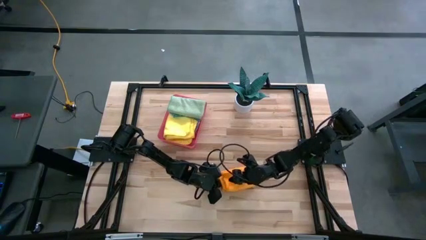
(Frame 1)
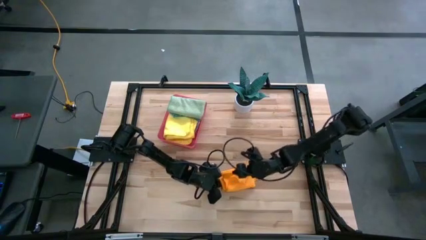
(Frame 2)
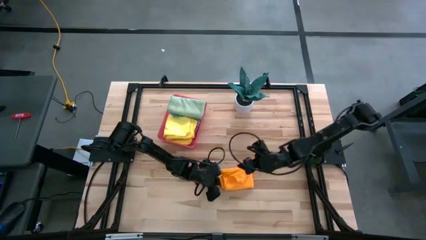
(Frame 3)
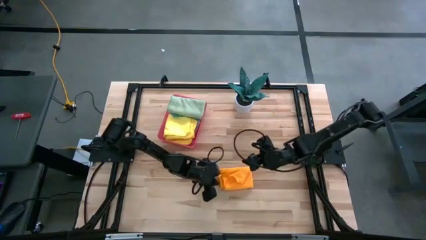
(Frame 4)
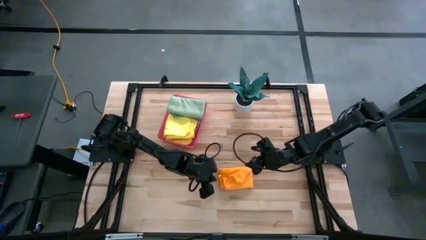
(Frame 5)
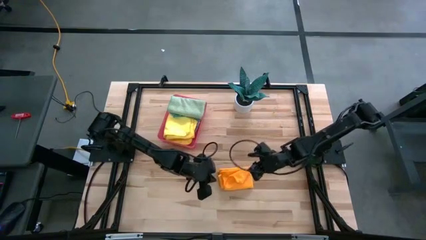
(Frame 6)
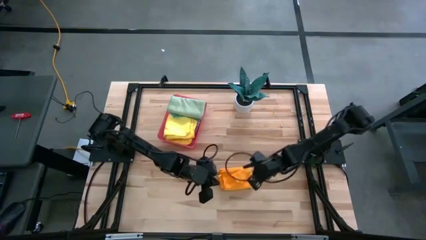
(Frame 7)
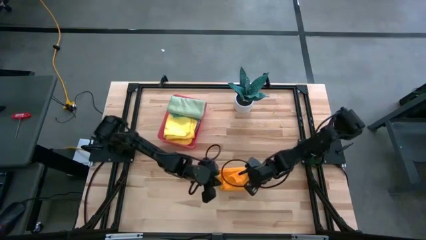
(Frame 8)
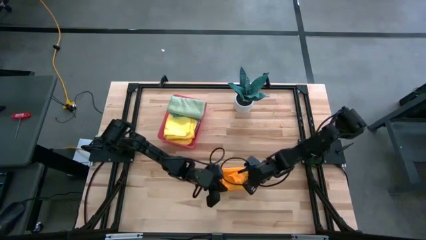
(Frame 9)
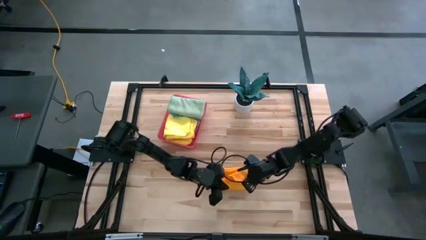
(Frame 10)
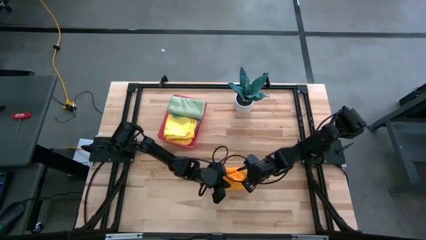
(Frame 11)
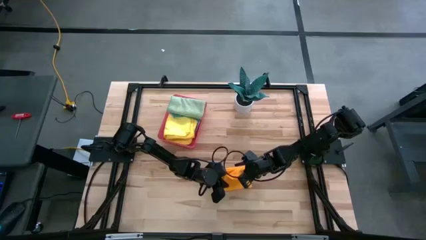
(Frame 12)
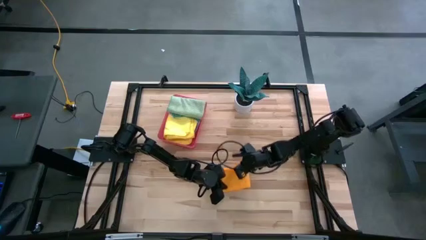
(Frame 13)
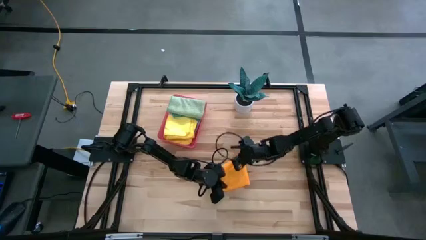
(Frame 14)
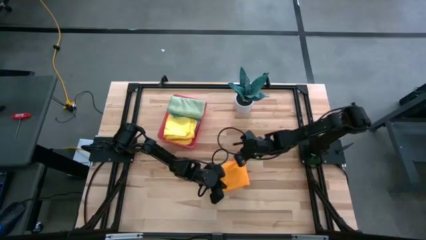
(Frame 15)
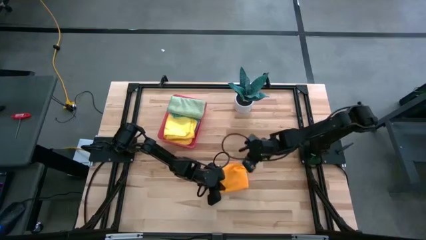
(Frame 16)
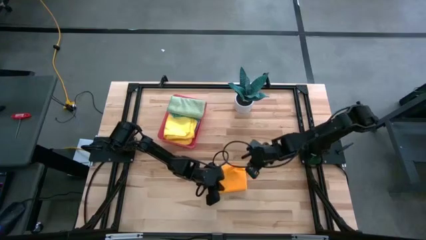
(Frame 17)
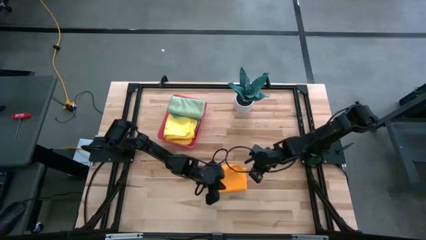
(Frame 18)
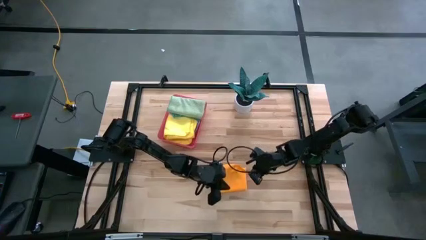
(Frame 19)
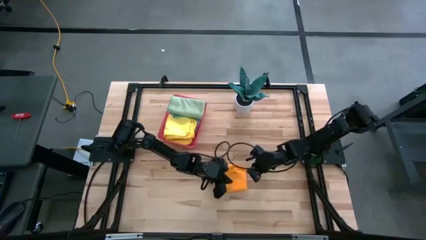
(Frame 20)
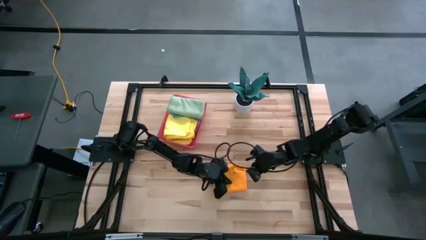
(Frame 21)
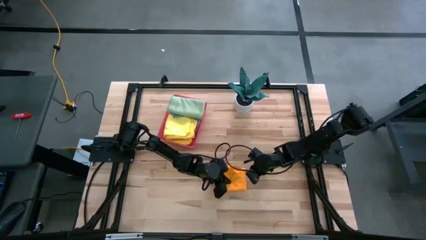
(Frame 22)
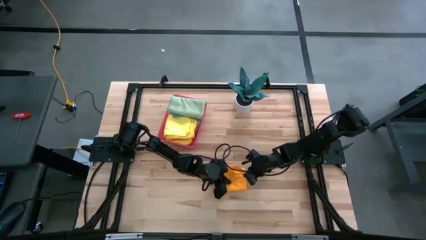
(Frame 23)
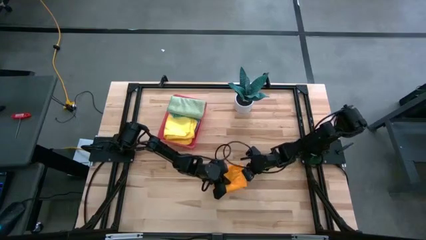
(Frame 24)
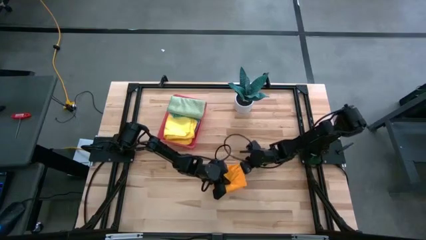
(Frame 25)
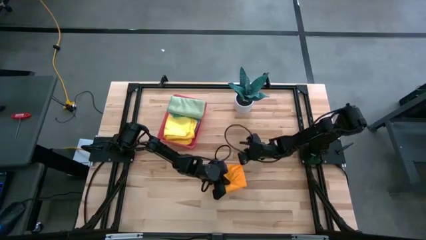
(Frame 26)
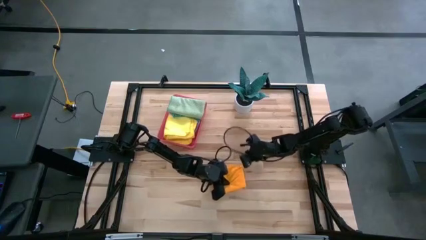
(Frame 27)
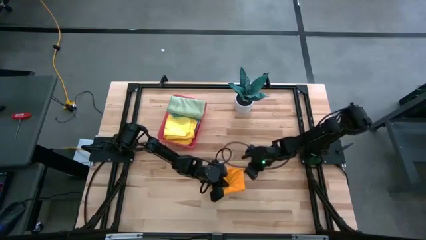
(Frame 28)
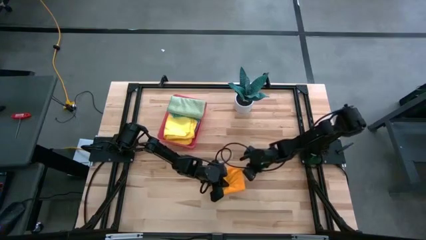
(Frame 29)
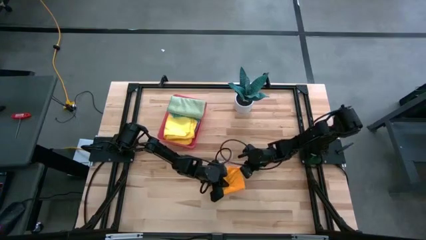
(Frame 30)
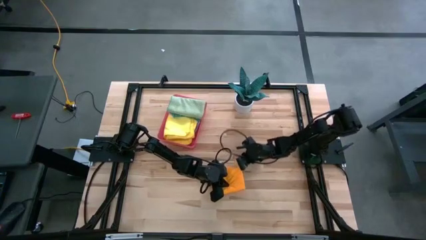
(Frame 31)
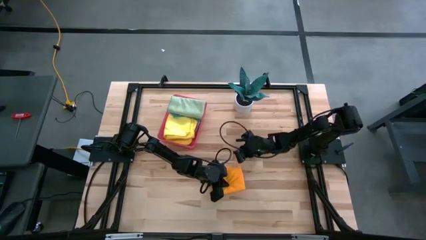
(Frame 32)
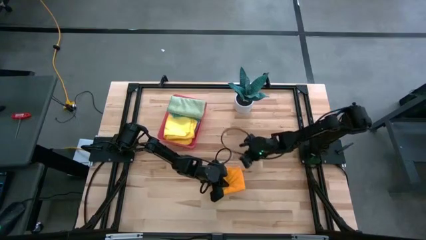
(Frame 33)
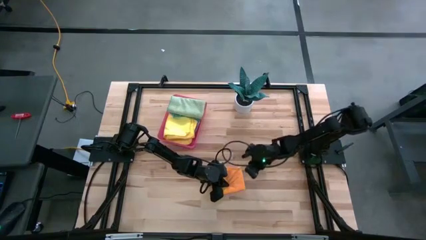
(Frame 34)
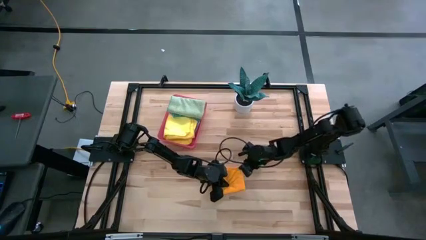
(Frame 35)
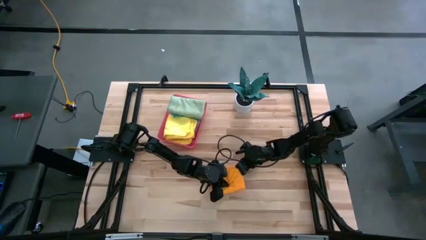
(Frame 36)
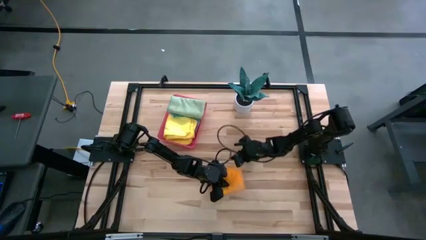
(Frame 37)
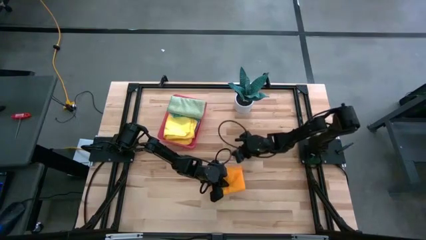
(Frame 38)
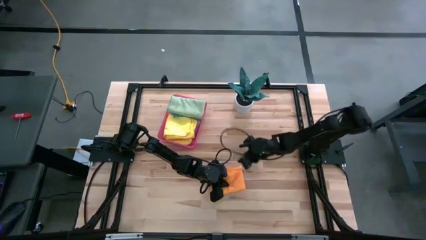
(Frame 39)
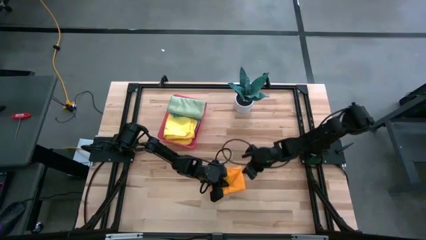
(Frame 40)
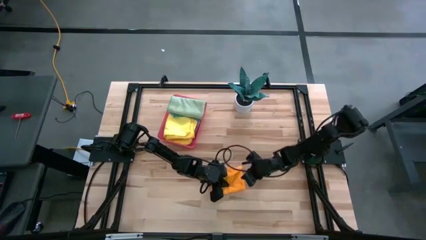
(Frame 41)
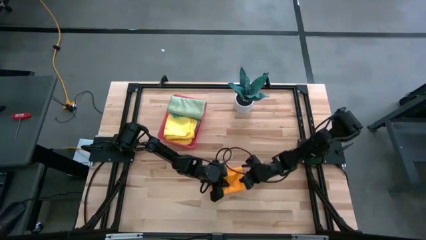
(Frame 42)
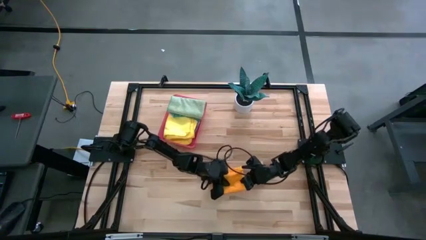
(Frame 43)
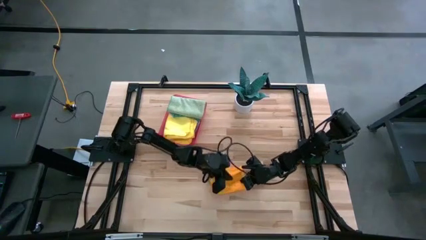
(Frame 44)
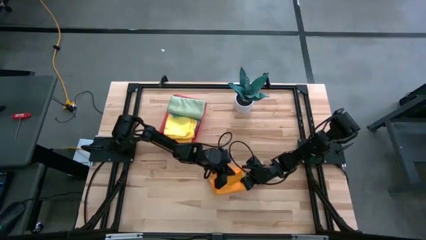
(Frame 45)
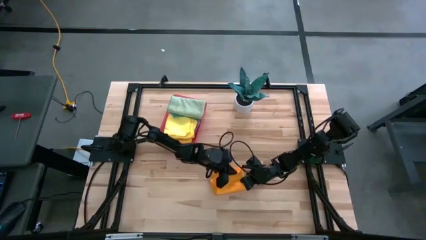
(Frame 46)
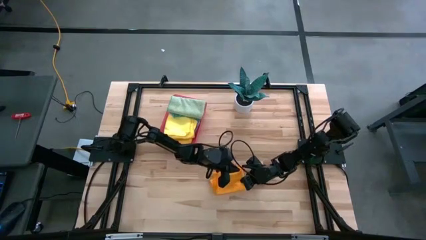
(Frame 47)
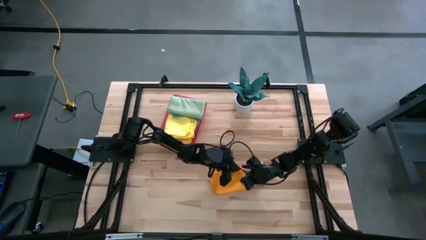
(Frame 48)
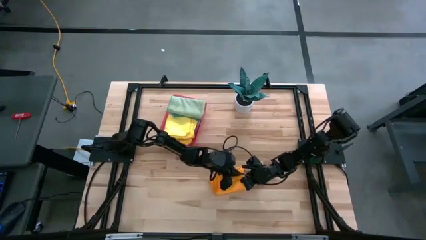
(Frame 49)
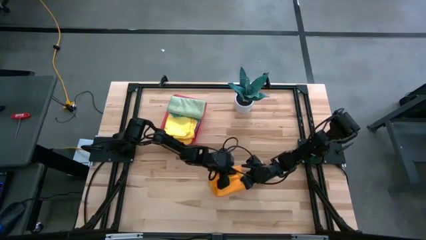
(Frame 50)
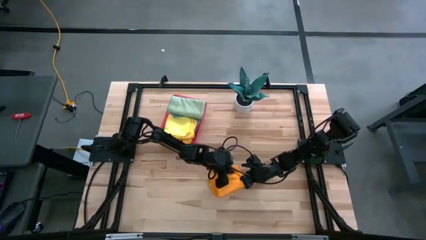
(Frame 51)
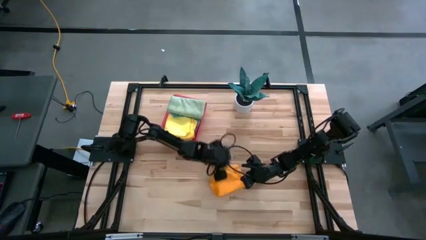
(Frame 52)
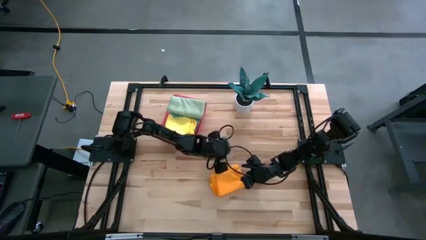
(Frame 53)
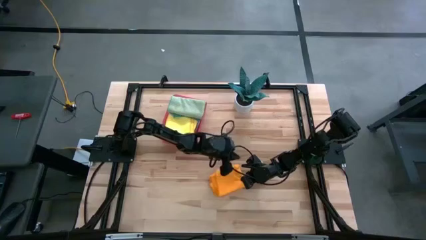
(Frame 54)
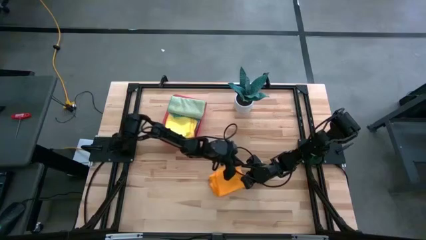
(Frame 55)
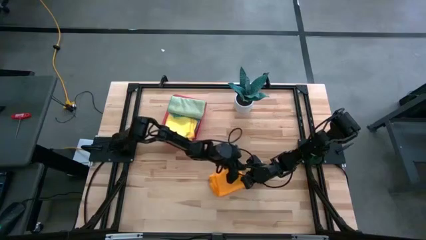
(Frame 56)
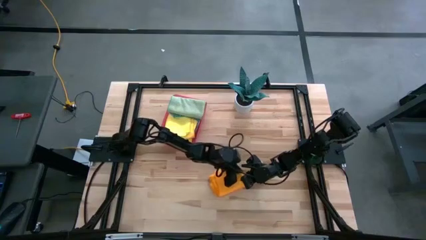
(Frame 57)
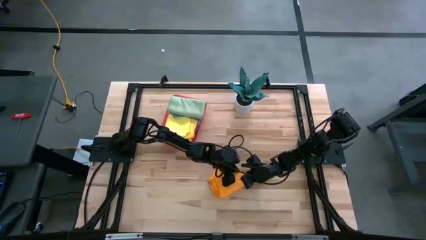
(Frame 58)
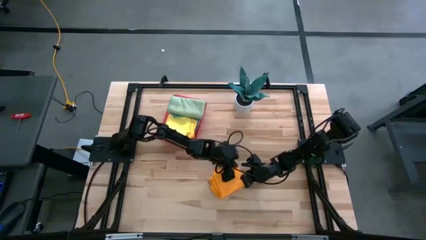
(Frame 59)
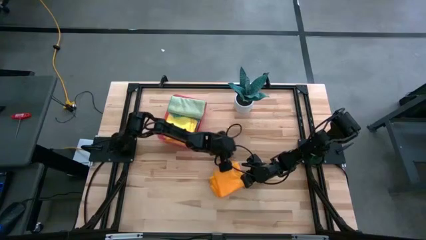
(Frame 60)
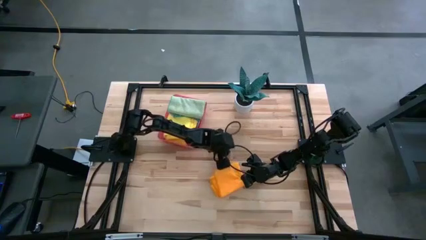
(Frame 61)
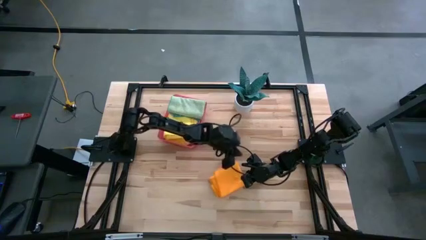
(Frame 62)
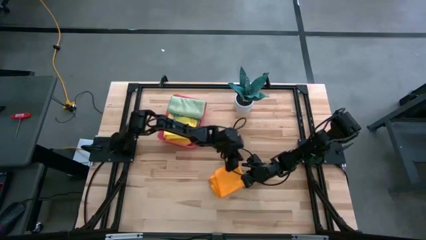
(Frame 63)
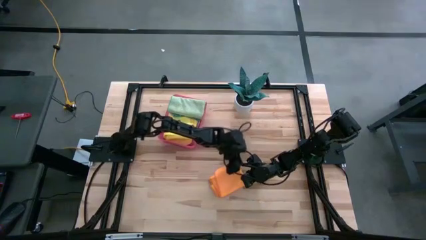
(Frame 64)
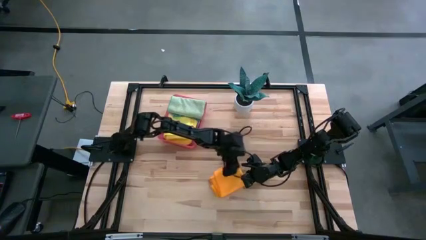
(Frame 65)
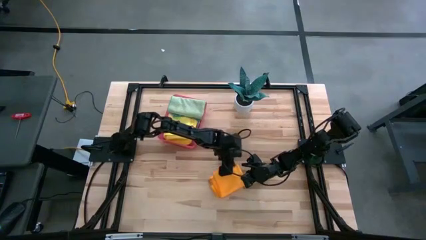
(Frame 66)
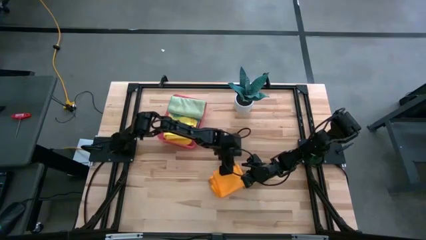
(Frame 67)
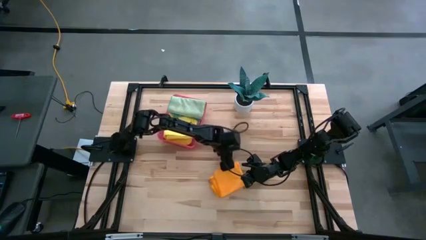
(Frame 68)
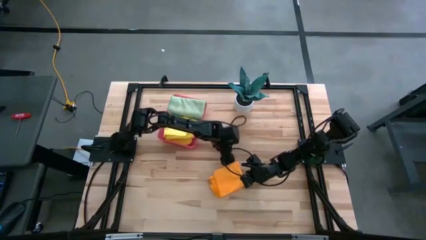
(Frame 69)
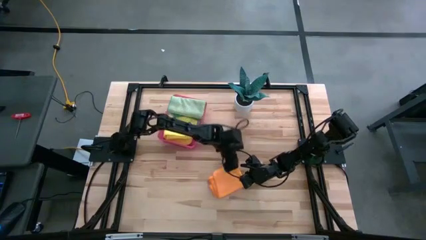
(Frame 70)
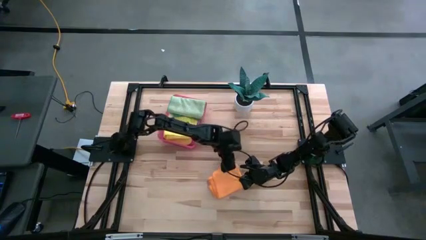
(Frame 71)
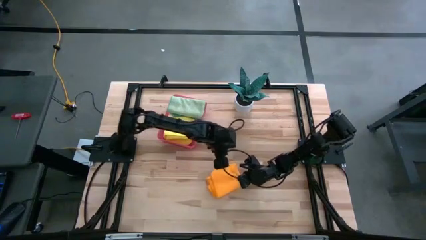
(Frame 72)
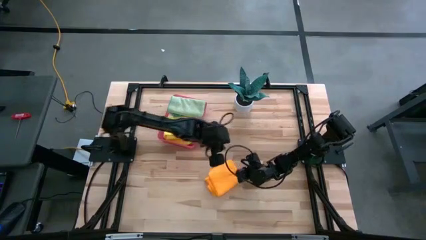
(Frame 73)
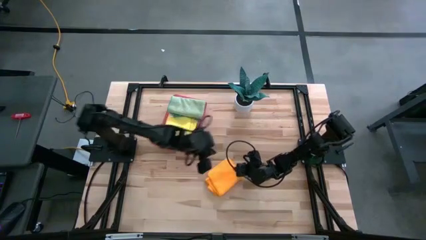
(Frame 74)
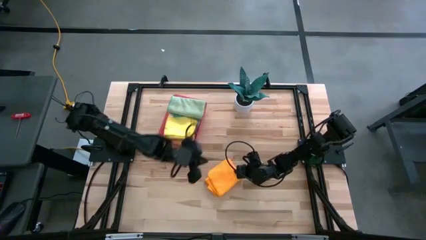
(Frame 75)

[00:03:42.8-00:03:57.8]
Task: Fold microfiber towels
Fold the orange microfiber towel
